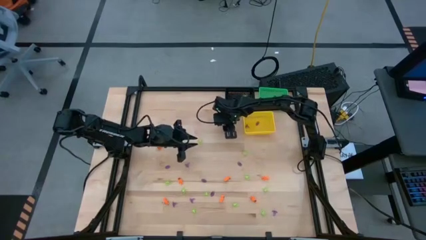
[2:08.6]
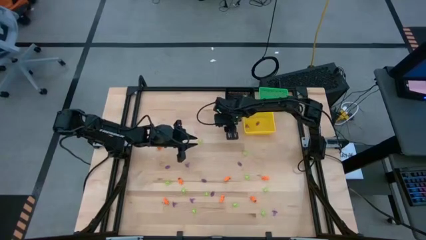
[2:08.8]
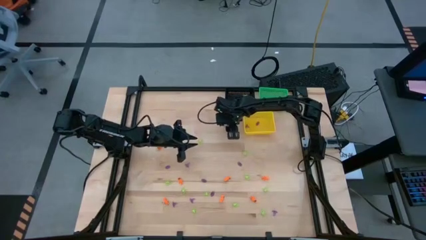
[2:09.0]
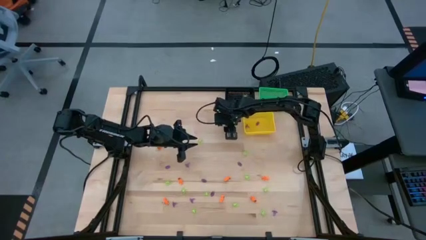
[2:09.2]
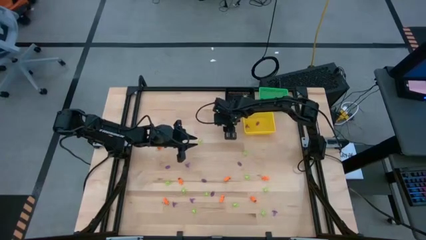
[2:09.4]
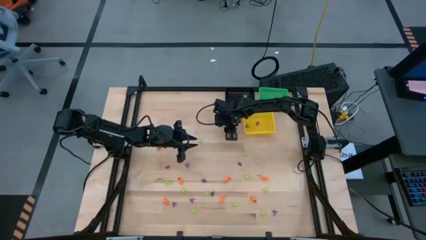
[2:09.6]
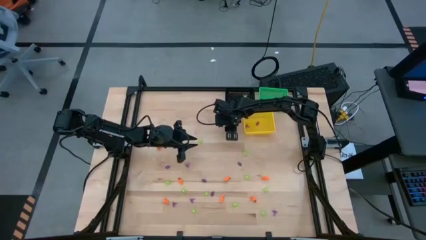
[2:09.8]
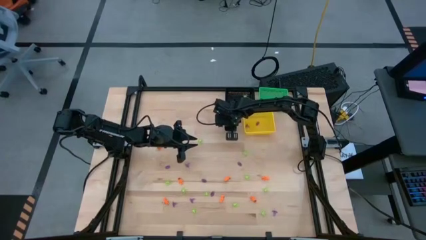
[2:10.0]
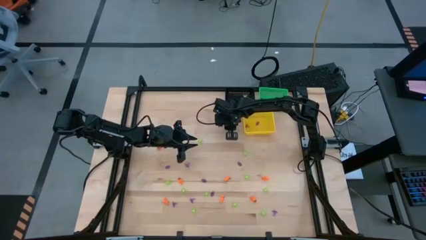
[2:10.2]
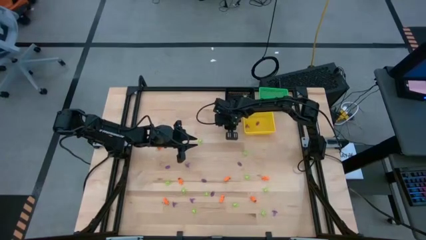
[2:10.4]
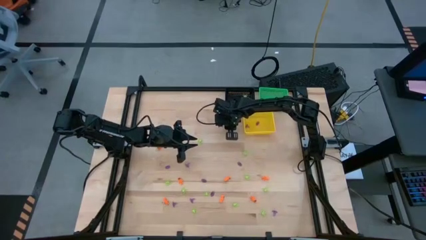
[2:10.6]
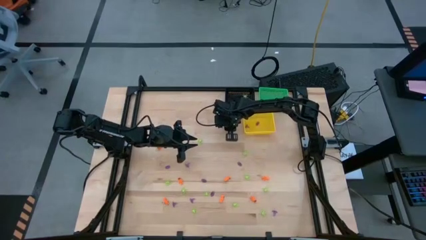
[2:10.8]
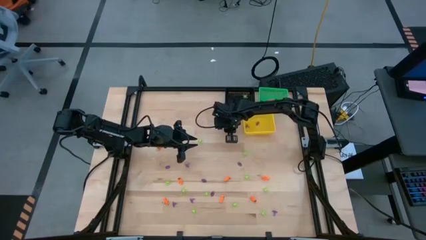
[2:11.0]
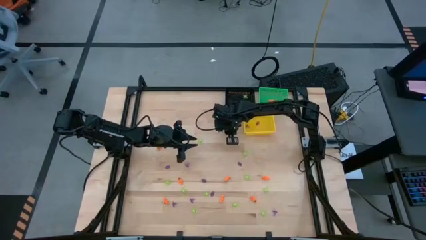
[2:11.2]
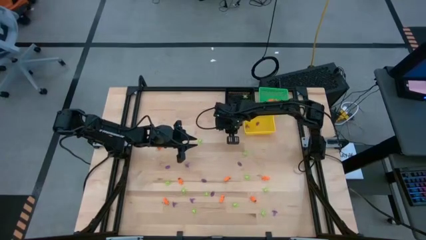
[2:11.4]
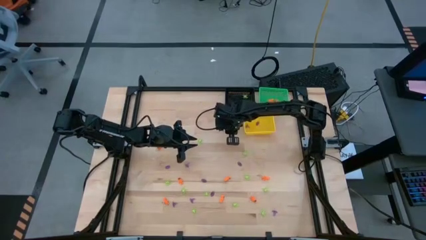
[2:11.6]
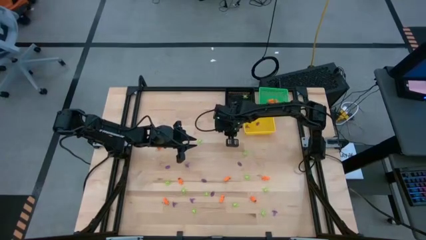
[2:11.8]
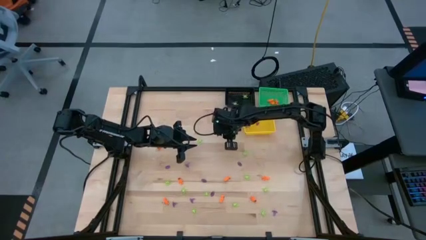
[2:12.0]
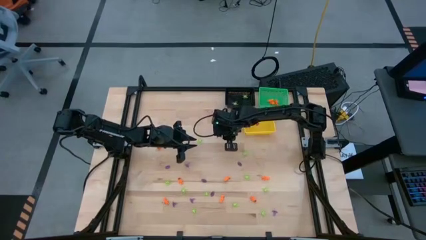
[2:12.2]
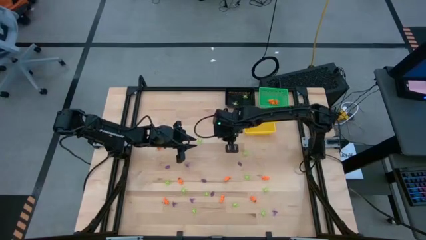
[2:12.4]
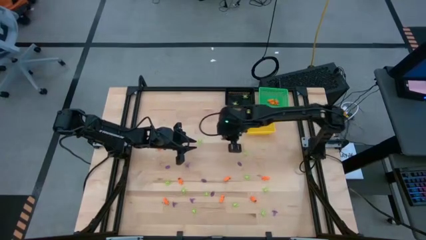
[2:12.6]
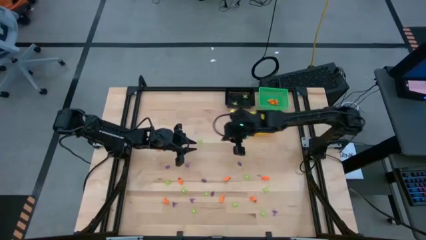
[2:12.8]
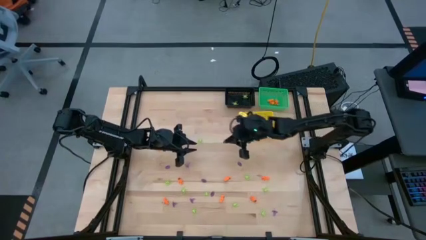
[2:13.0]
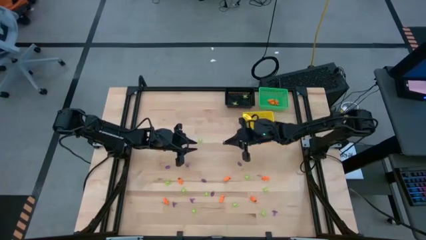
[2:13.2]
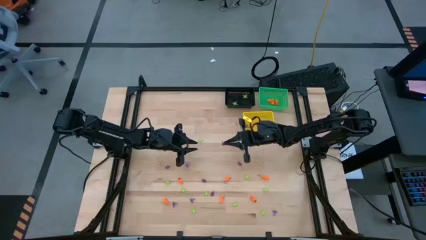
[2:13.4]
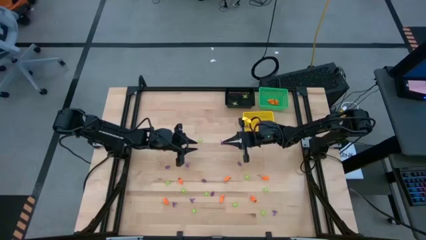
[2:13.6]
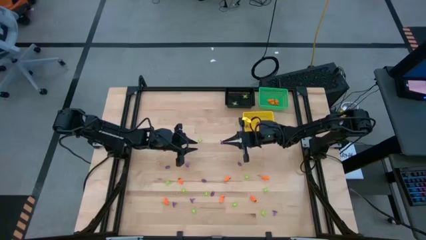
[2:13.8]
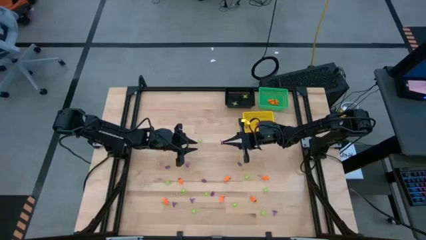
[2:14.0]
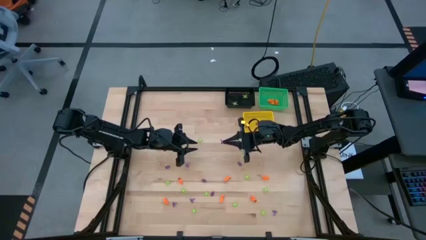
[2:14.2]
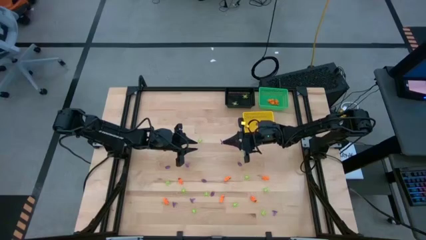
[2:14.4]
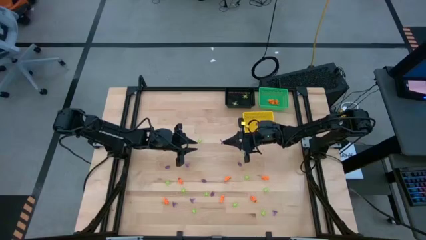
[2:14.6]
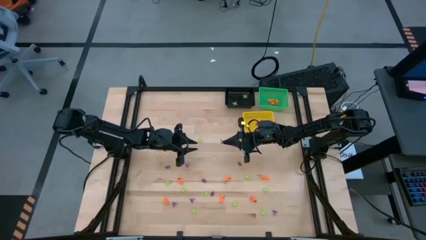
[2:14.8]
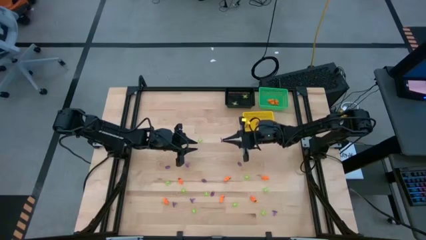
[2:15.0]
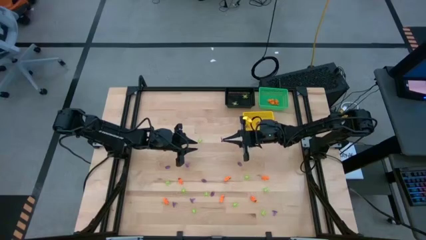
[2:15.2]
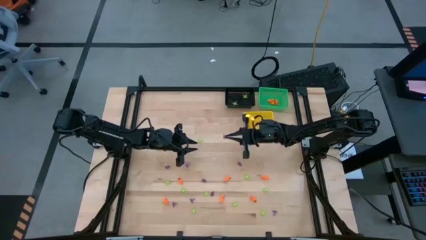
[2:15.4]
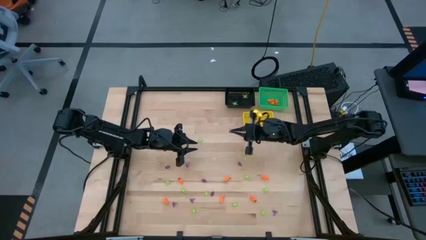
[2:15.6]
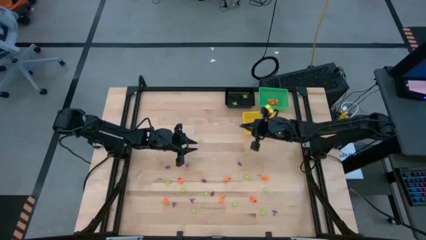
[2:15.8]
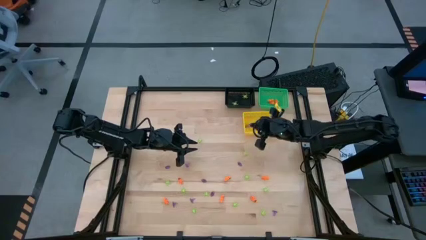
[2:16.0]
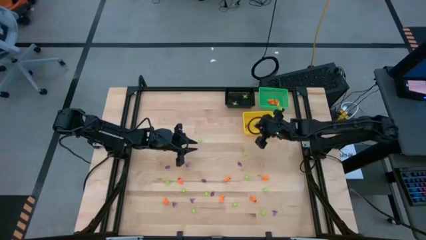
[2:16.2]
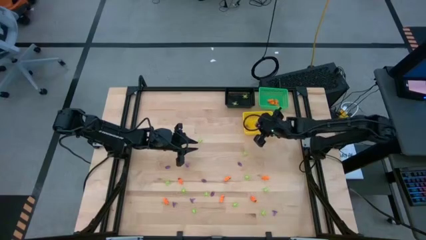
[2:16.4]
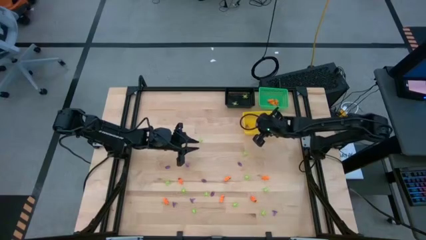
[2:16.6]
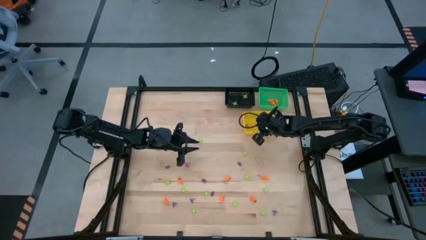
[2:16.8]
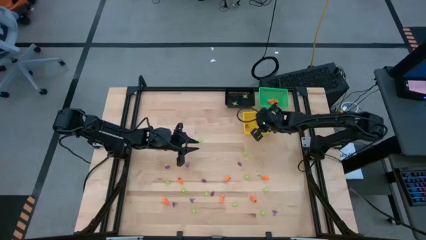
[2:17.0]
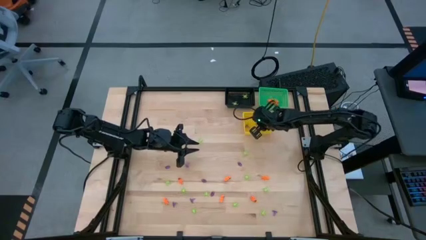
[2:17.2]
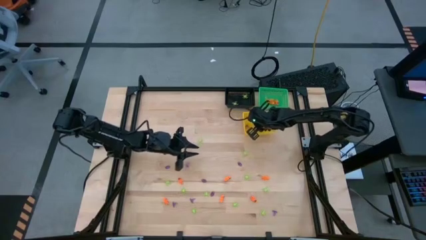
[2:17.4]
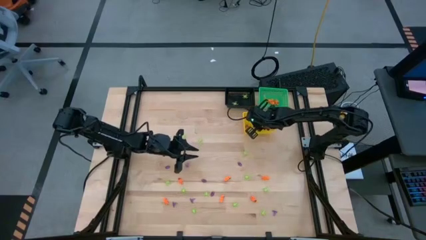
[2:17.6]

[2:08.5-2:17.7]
Task: Sort Halloween decoration
Put the violet witch hat toy into the yellow basket

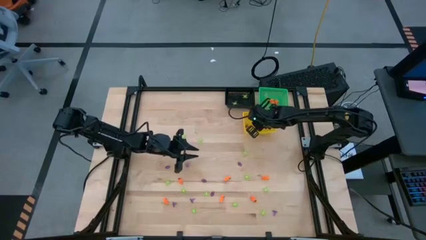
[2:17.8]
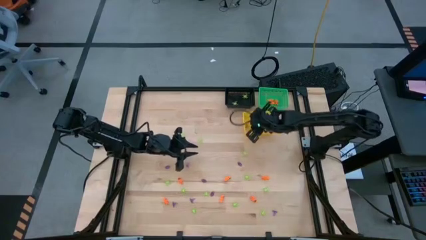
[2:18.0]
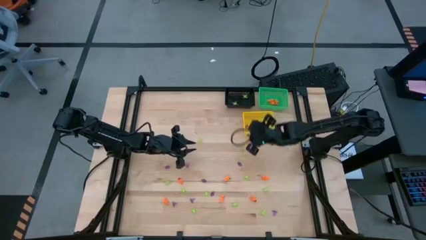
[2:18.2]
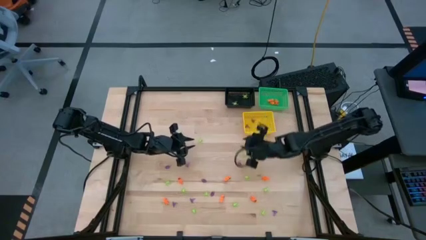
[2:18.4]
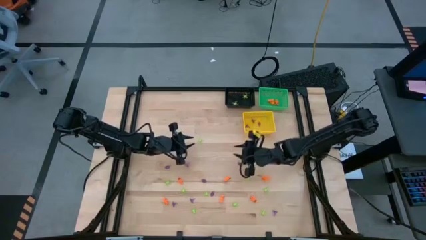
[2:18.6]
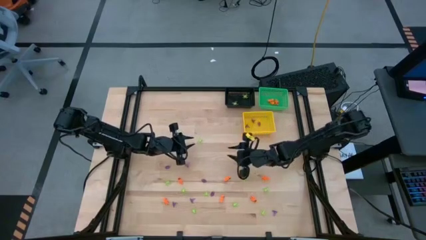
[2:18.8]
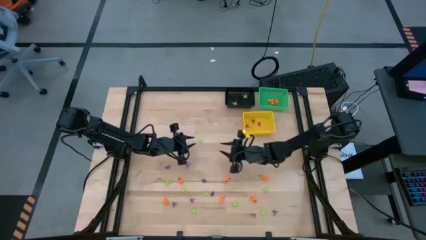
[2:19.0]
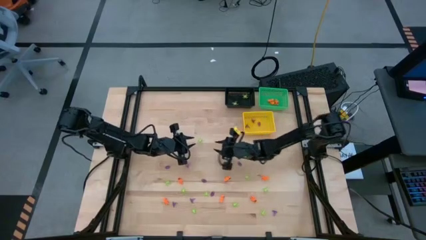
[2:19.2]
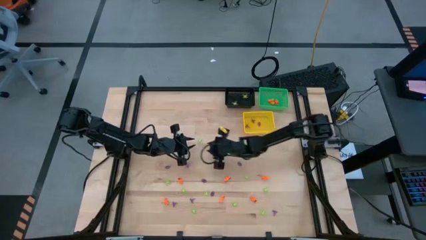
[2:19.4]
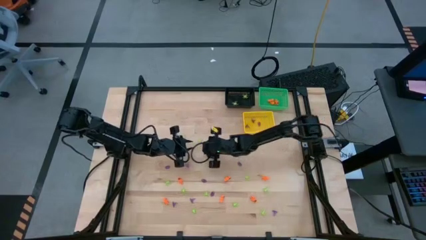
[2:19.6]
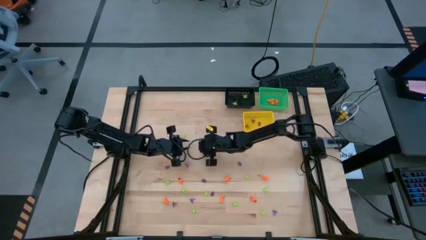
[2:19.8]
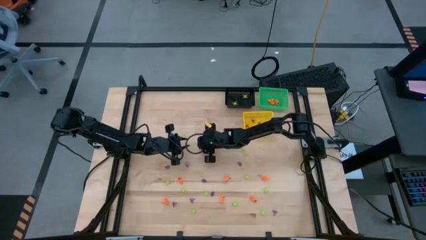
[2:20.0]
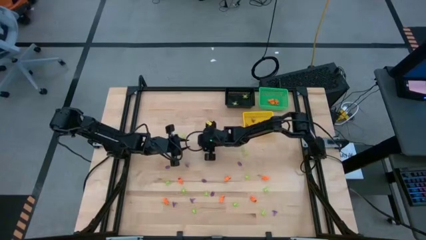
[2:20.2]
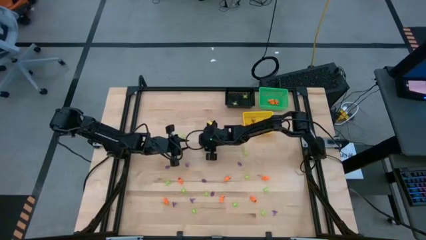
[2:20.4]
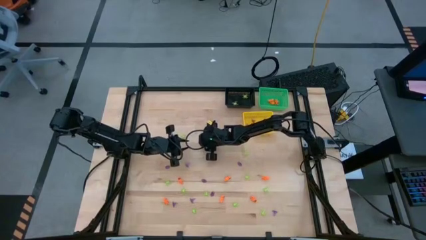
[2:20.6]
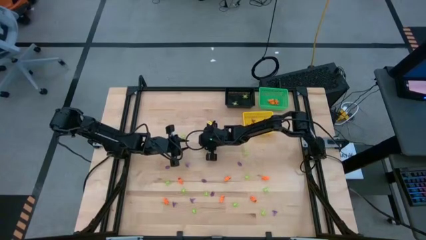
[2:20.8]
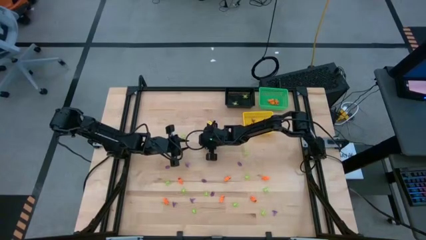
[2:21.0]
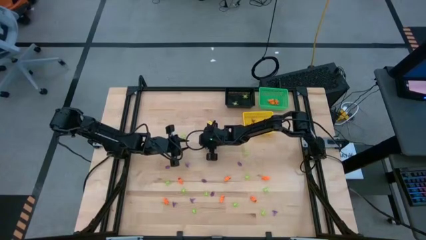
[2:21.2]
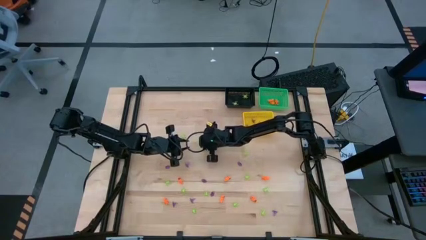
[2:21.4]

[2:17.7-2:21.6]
Put the green spider toy into the black basket

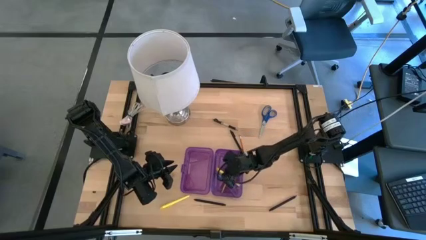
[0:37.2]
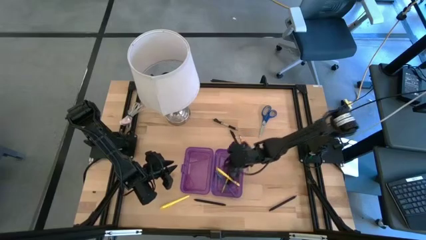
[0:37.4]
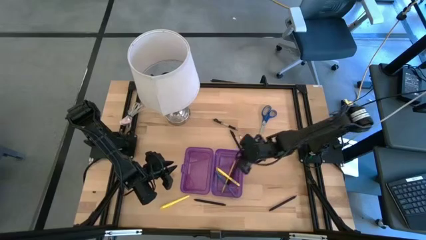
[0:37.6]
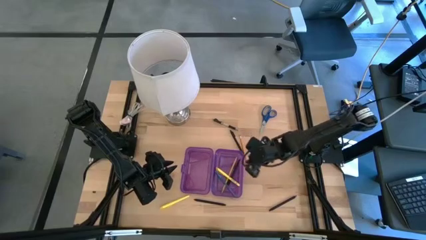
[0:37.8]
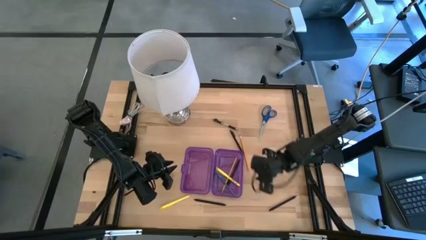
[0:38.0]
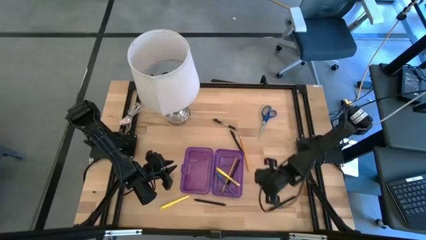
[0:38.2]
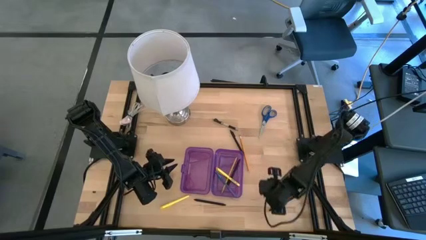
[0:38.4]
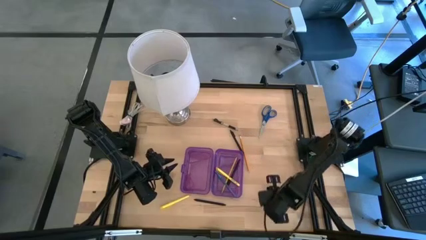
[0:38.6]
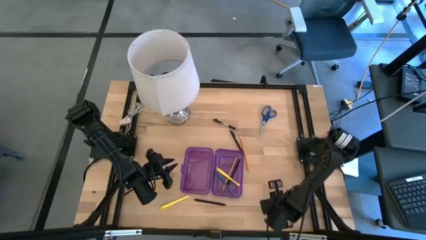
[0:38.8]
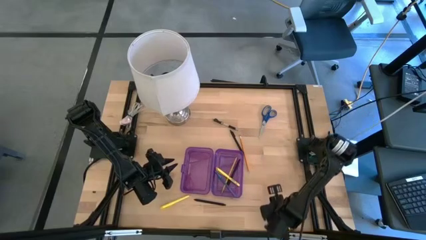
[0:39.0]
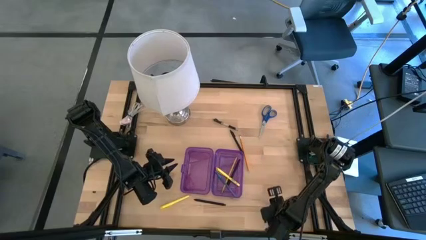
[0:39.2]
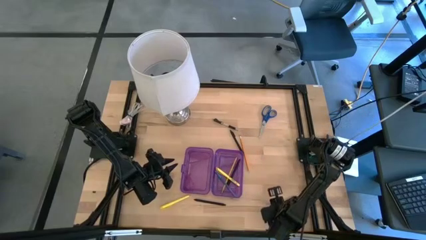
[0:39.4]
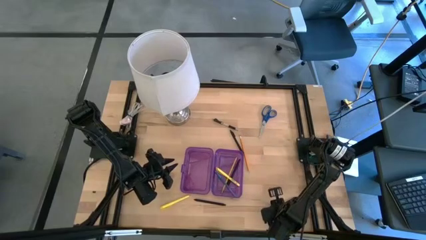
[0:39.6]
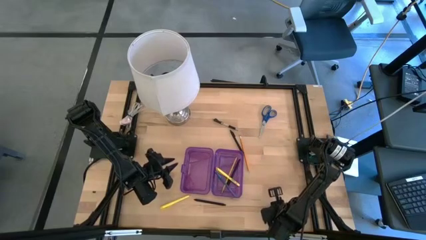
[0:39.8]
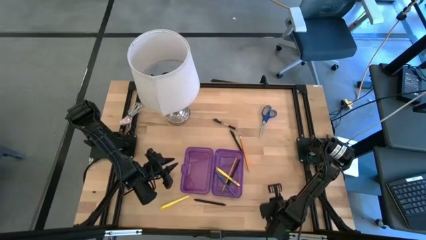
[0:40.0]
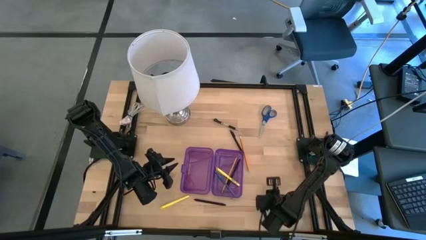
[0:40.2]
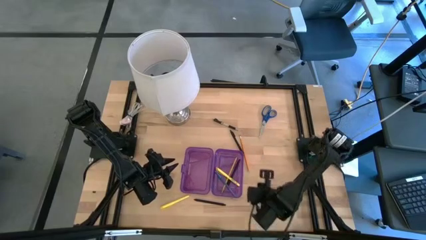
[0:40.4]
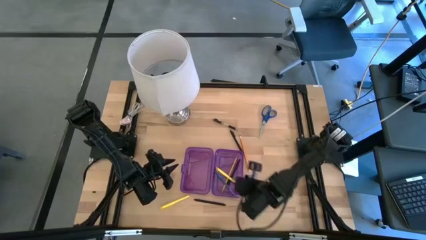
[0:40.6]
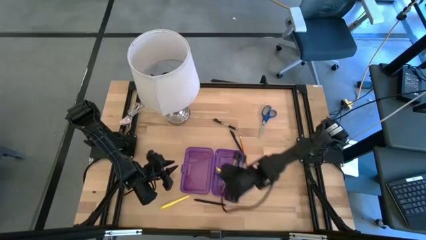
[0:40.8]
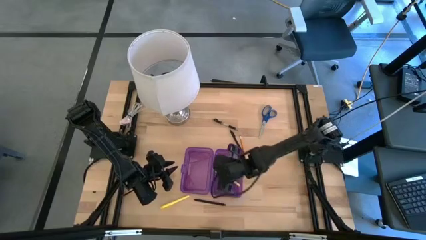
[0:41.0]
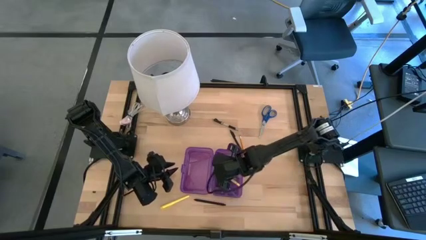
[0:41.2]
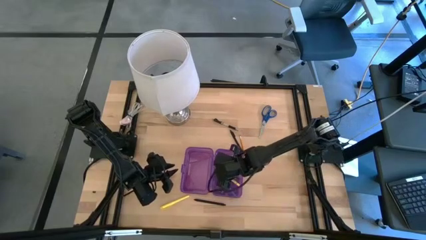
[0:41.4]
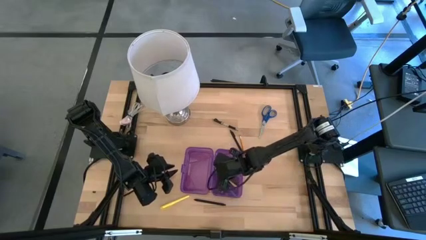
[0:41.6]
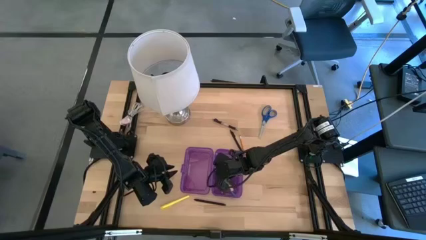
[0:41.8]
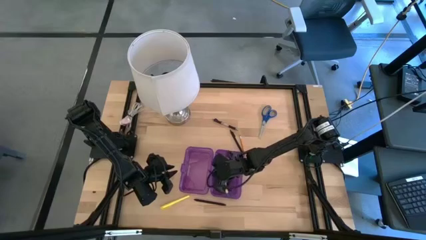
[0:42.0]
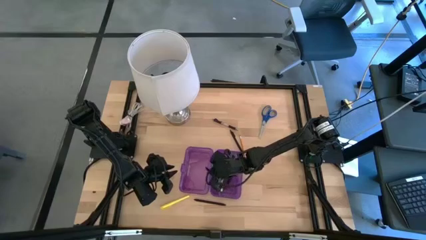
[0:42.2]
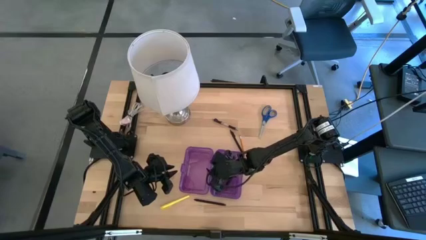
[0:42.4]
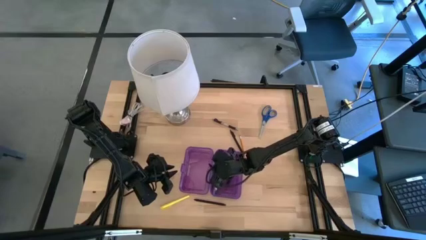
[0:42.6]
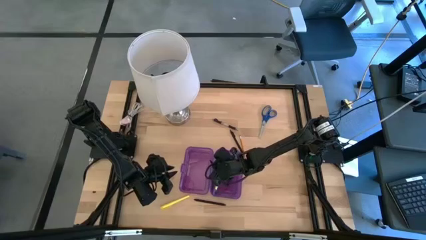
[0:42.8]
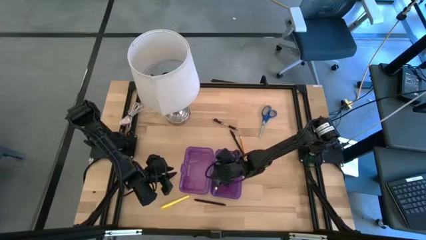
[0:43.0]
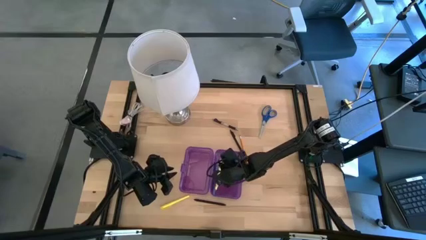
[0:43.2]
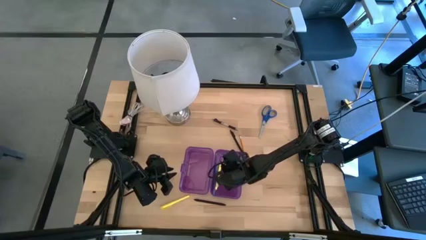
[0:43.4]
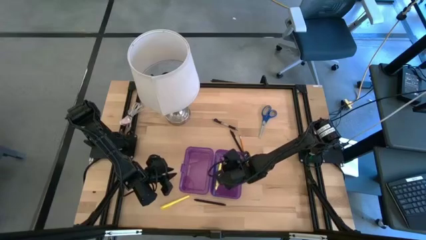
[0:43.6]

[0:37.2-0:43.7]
Task: Pick & place school supplies into a supply box
Put the black pen into the purple supply box
